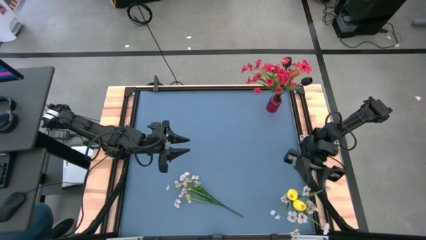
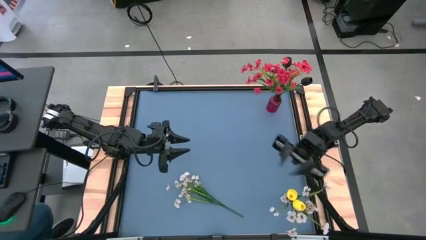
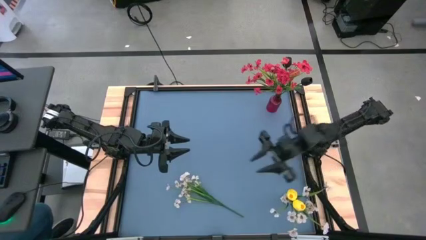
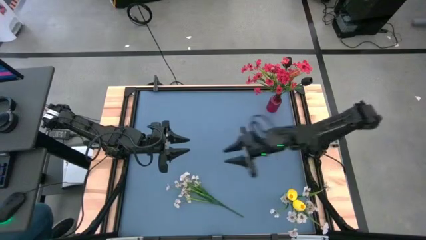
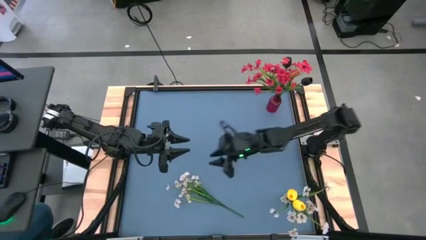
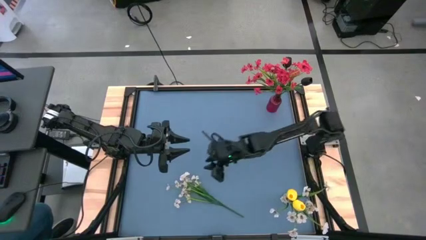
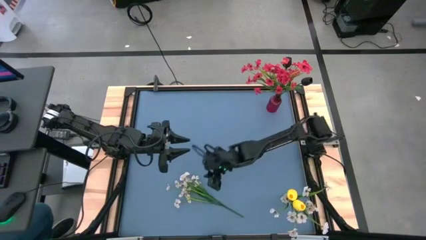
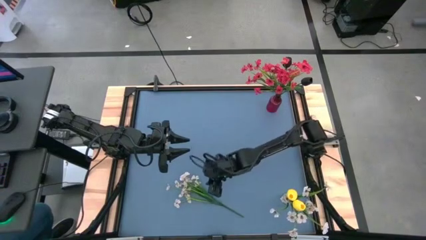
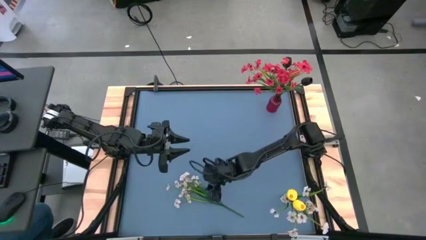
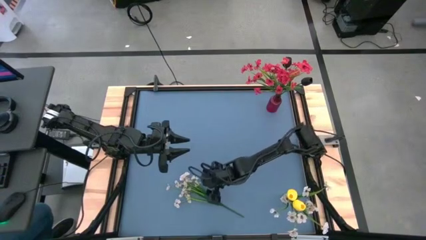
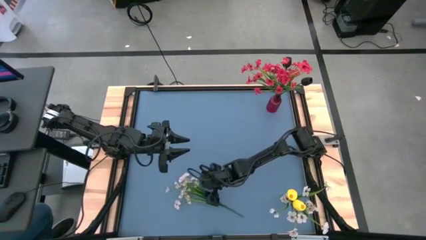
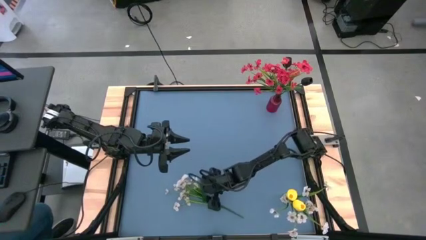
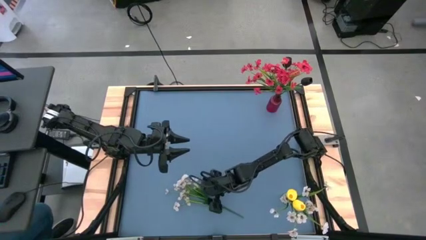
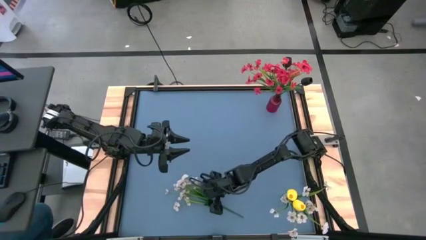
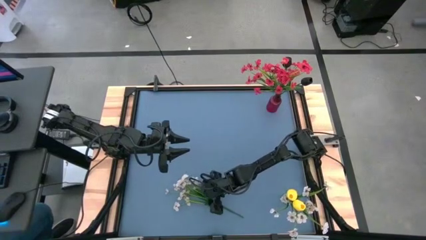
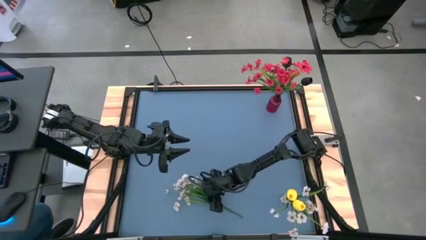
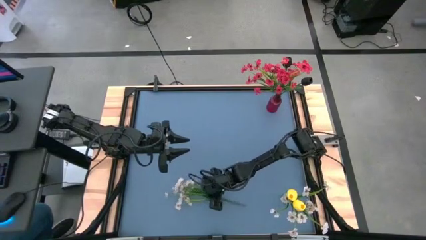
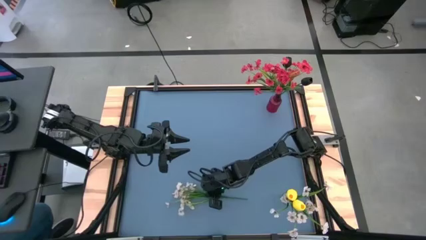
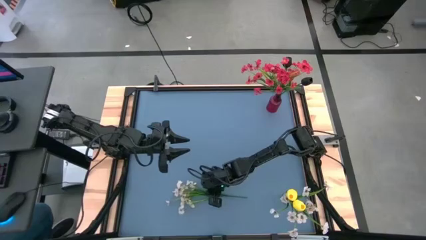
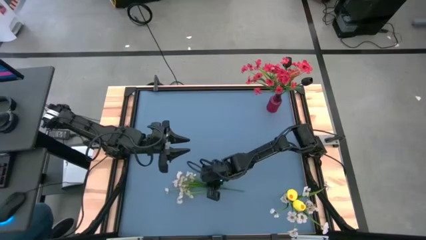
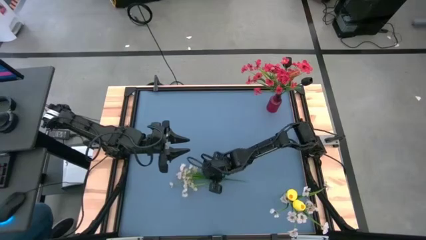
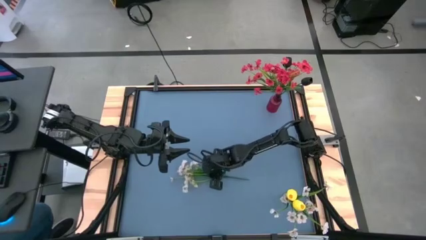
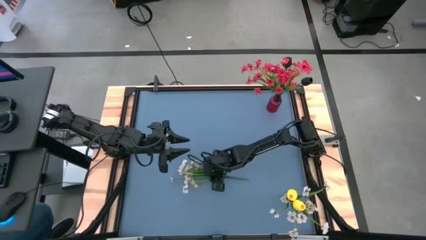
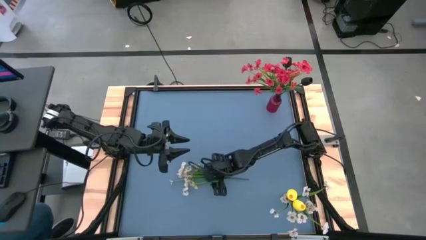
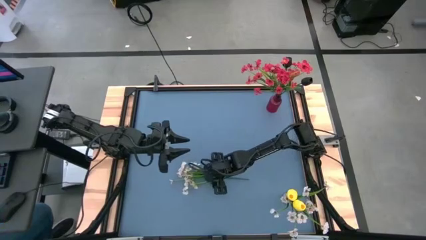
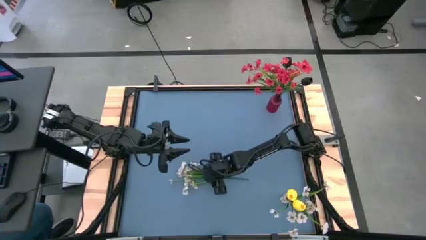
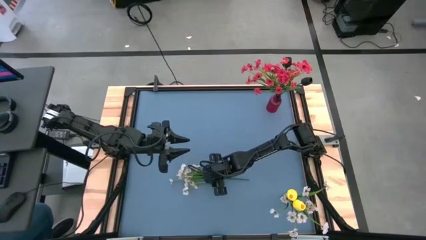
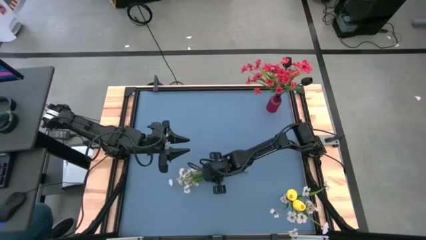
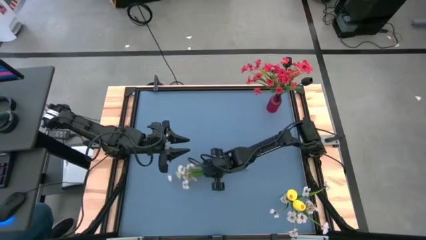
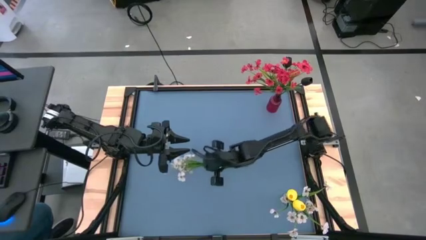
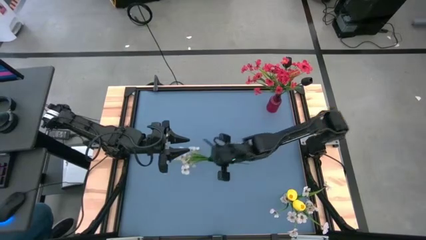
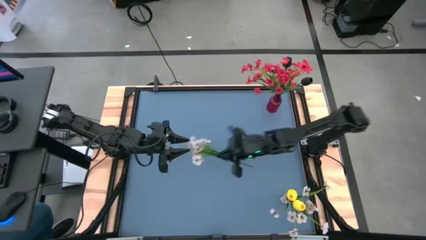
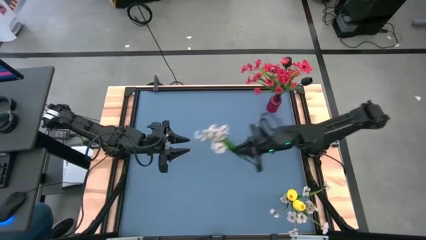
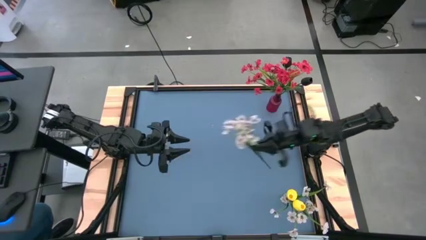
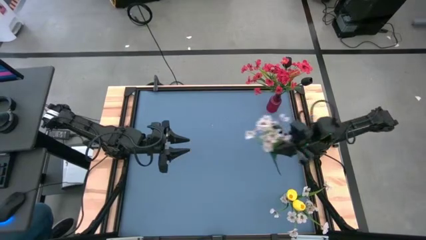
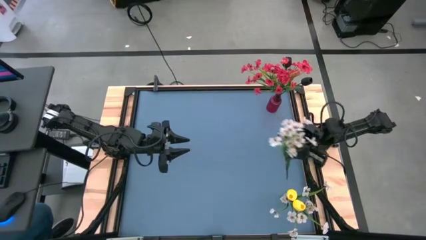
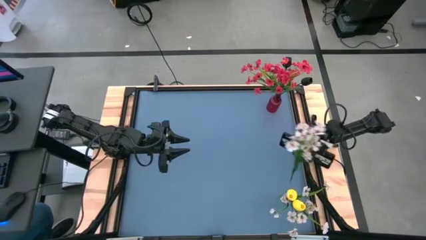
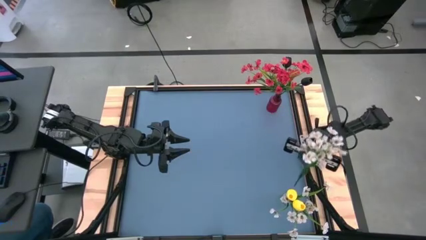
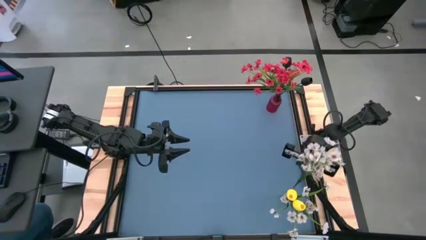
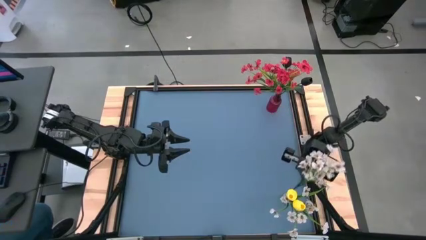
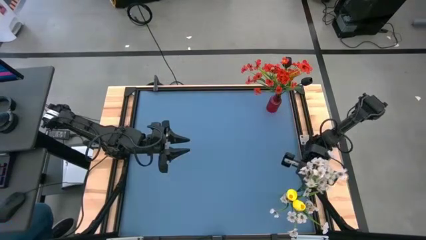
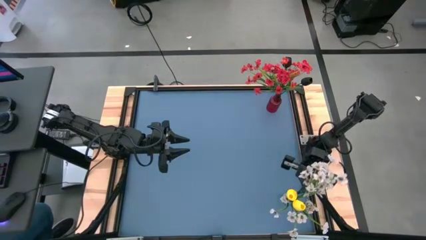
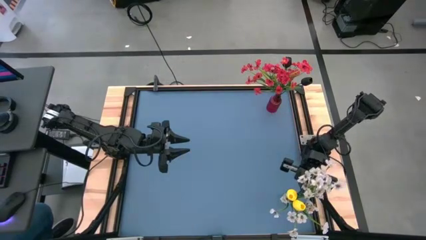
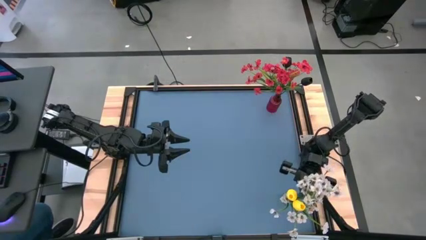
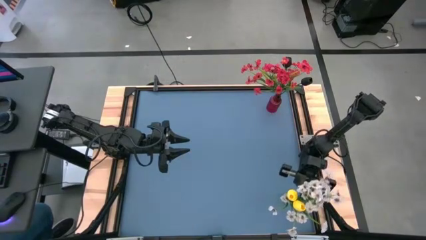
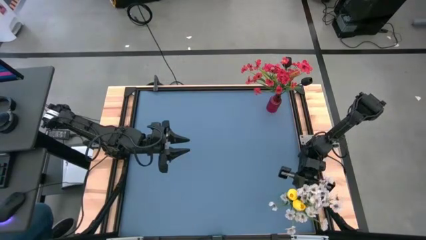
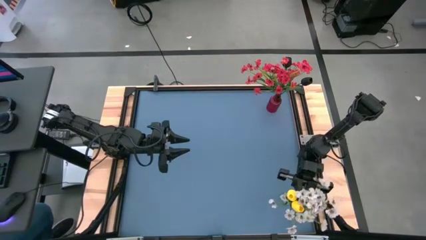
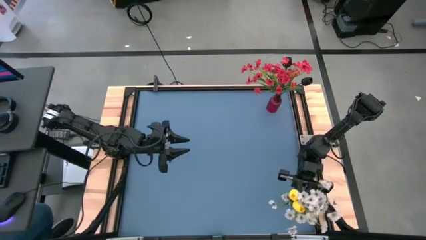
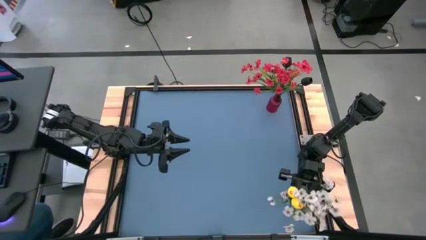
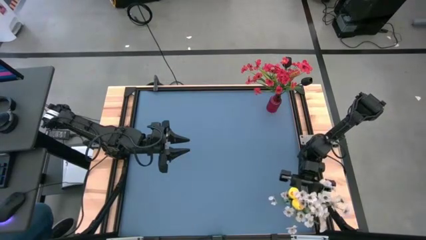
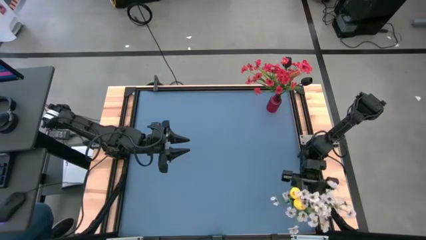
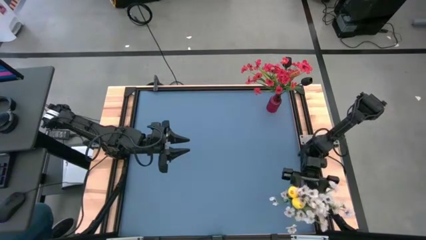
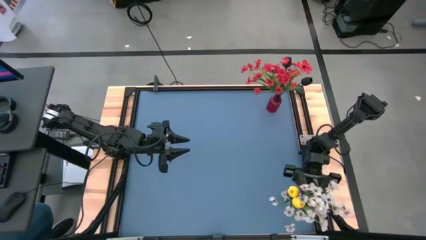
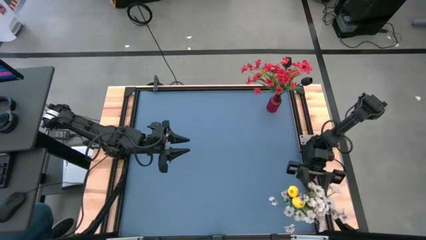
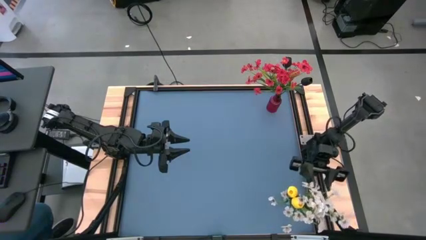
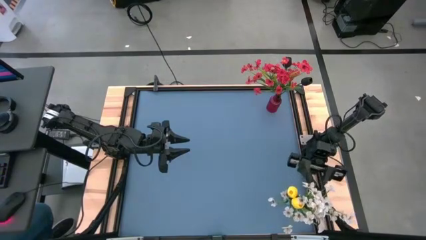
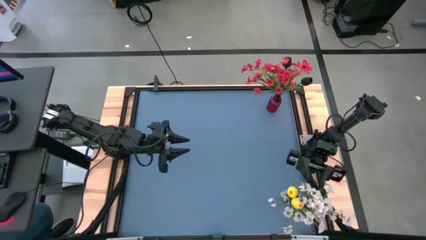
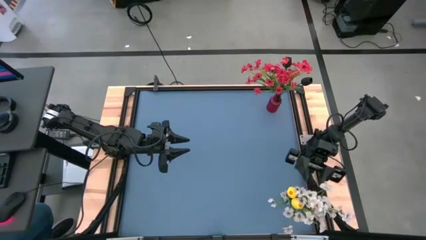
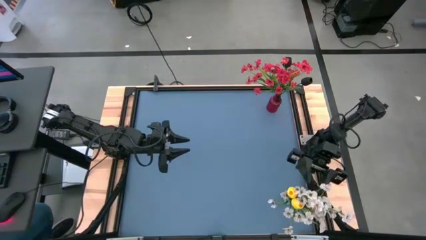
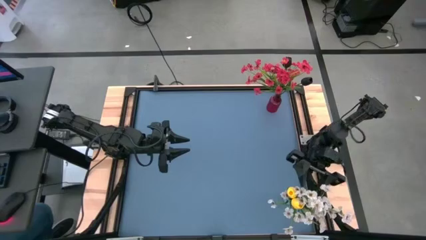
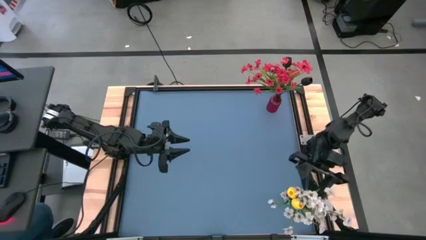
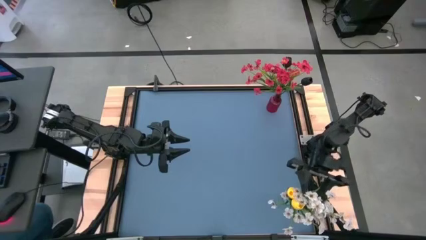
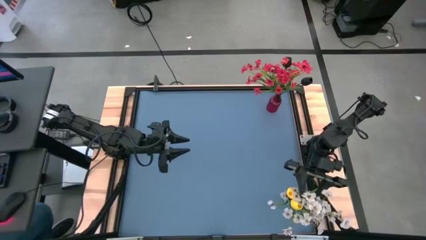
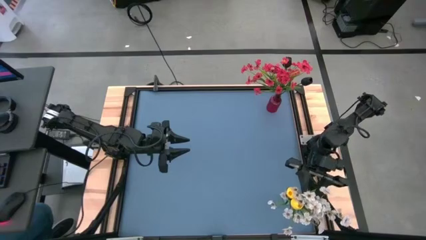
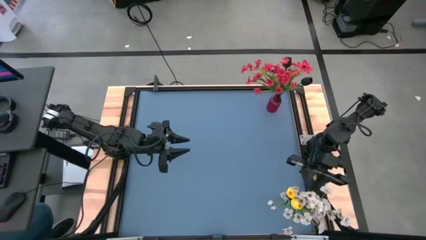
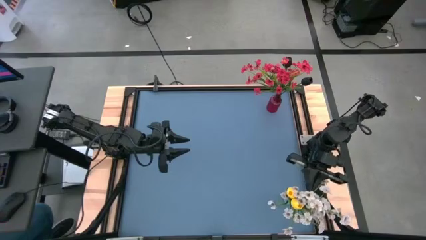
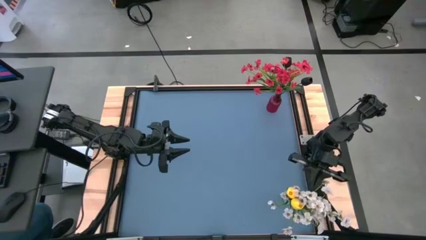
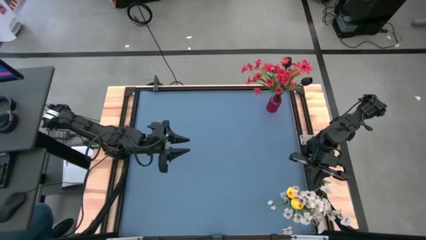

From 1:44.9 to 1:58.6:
Task: Sort flowers into vase by color
Put the white flowers into the transparent vase

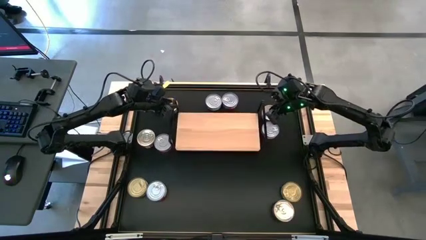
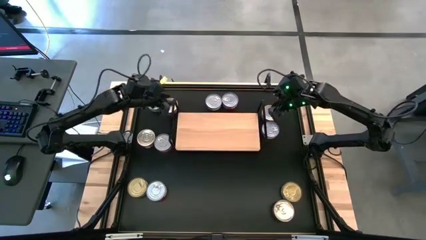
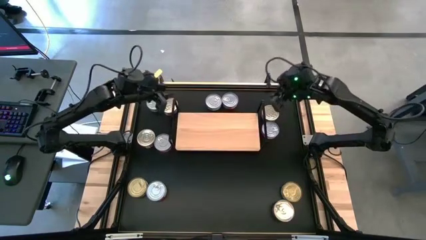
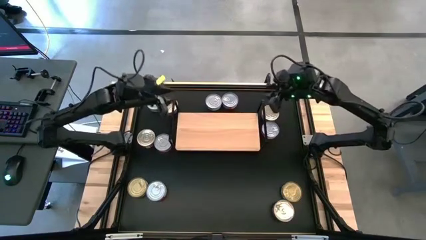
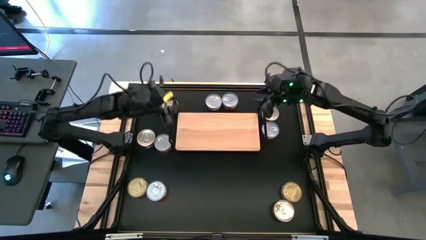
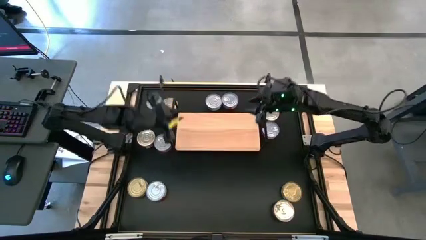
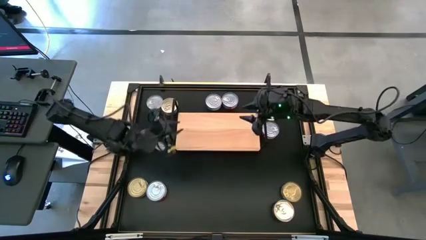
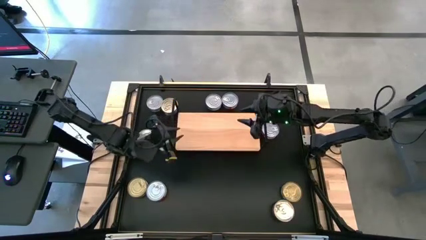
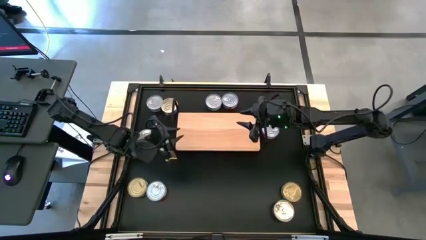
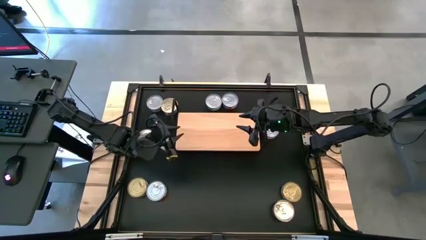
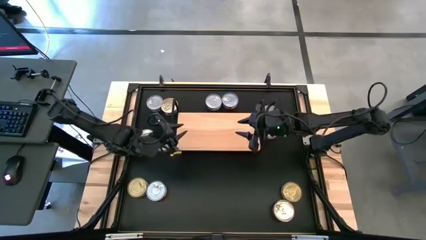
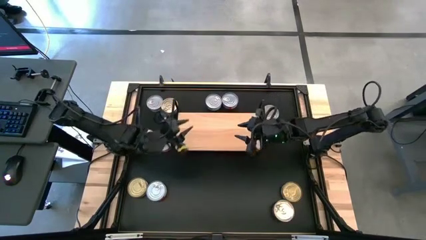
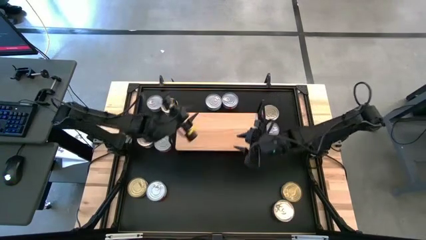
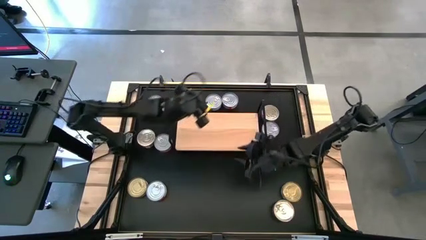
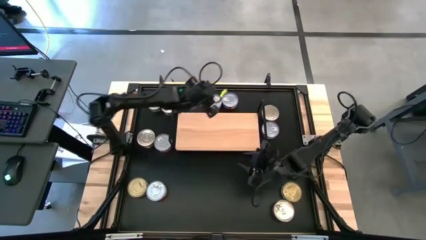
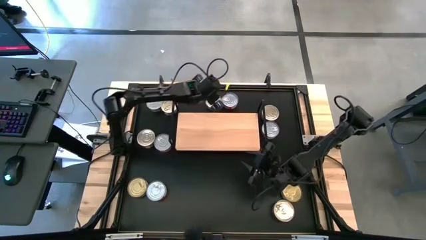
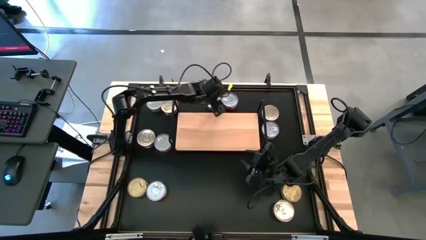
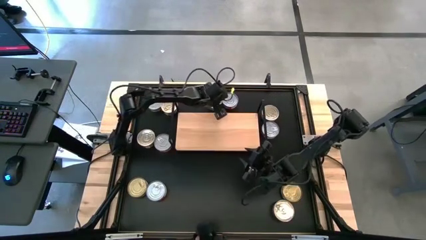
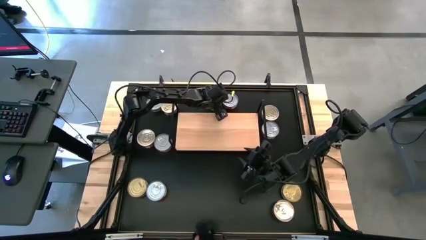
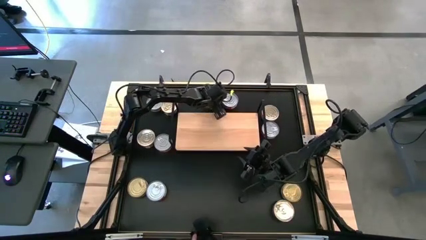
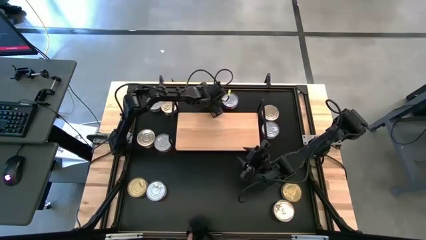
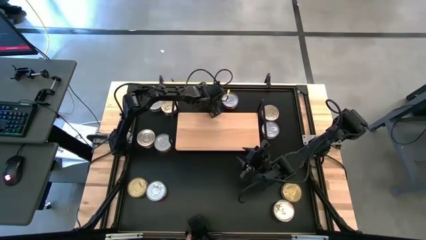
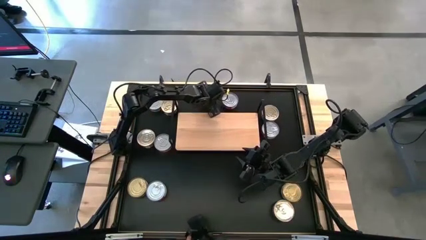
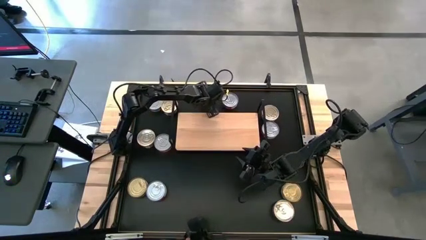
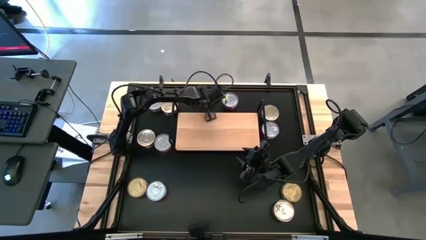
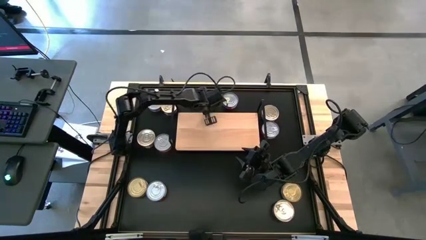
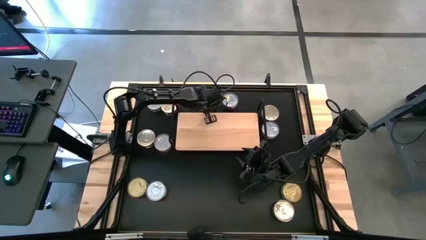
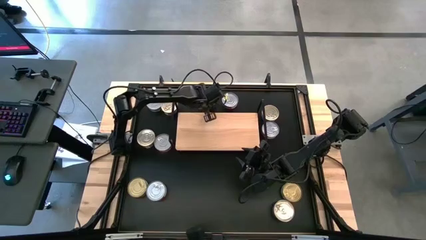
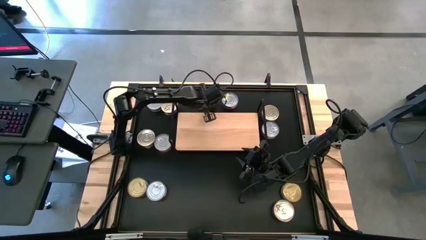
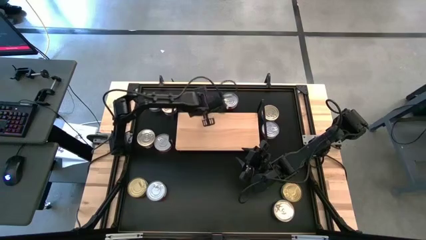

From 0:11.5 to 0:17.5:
Task: Stack canned seafood by type on shelf
Put the green tuna can on the shelf
